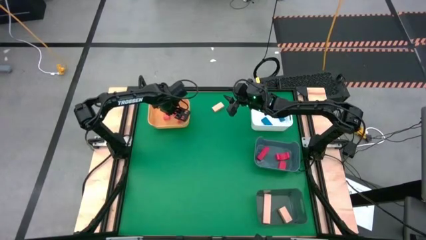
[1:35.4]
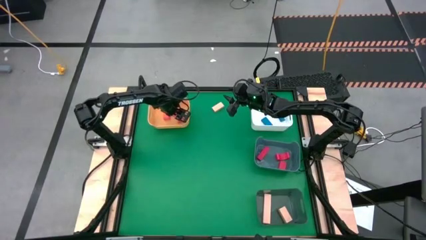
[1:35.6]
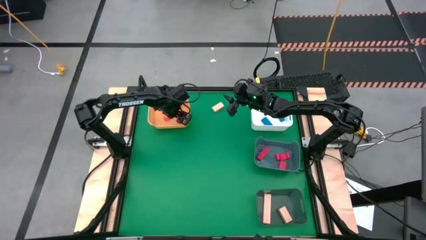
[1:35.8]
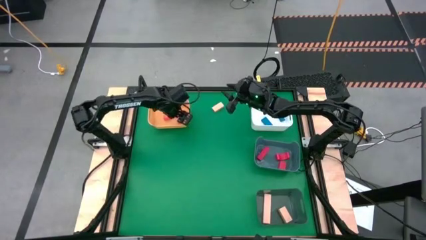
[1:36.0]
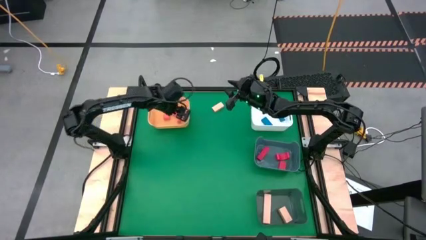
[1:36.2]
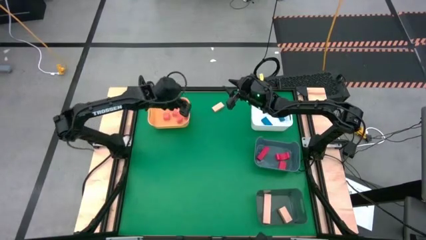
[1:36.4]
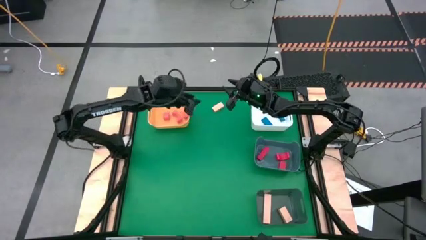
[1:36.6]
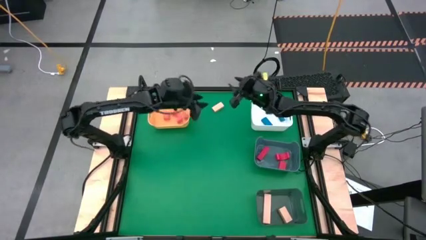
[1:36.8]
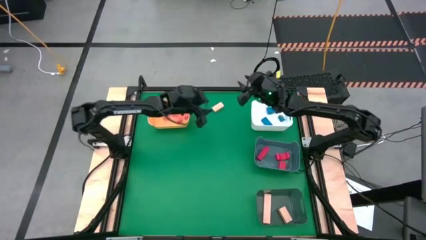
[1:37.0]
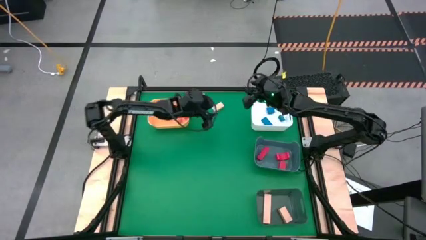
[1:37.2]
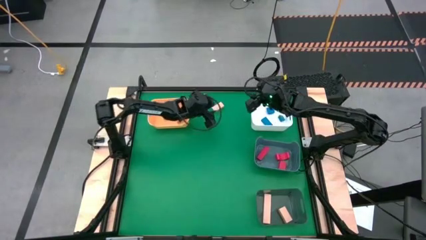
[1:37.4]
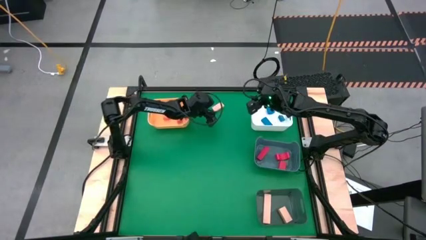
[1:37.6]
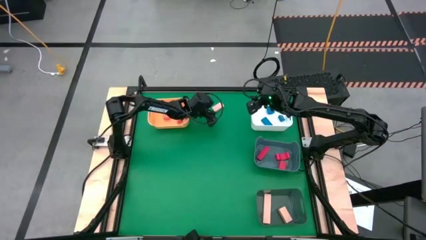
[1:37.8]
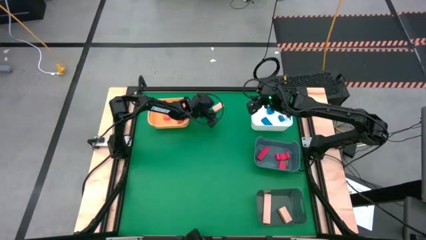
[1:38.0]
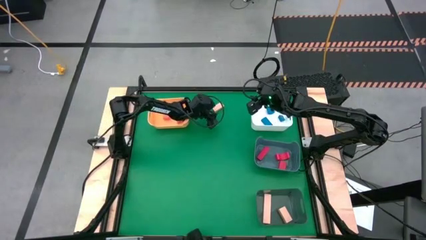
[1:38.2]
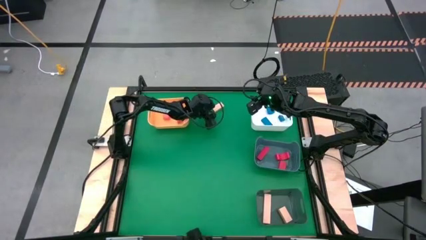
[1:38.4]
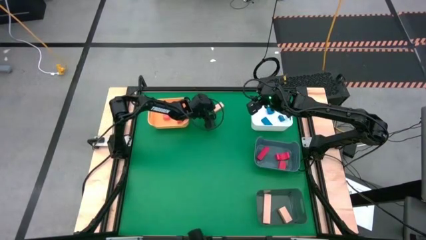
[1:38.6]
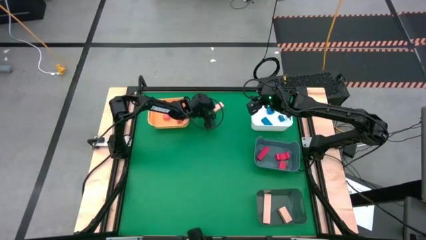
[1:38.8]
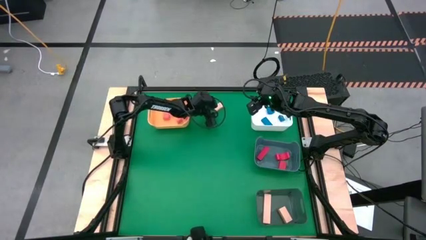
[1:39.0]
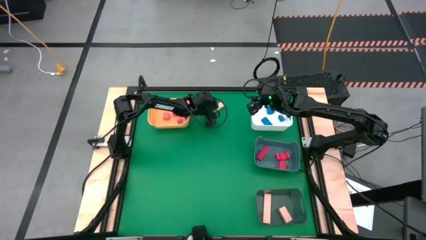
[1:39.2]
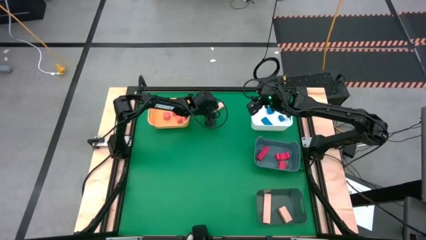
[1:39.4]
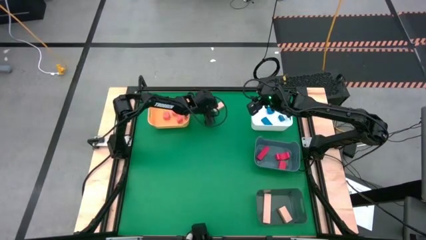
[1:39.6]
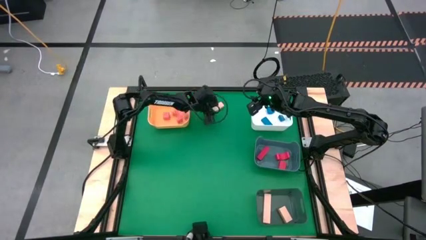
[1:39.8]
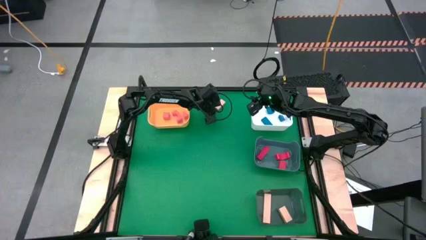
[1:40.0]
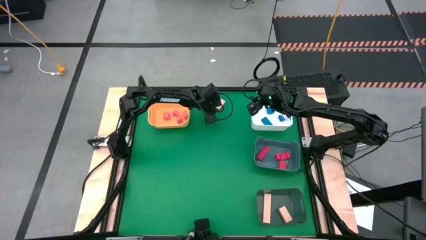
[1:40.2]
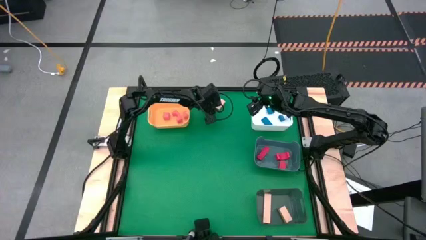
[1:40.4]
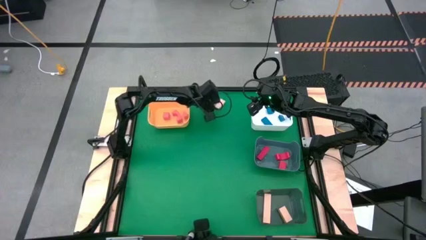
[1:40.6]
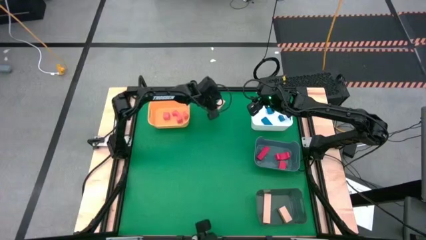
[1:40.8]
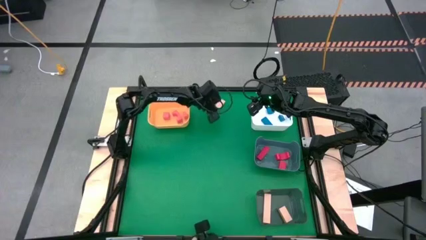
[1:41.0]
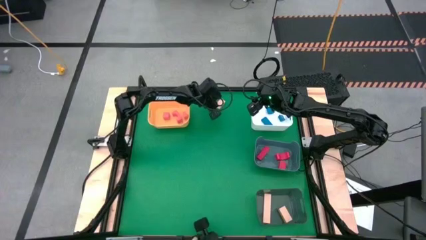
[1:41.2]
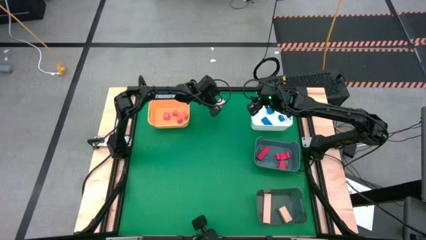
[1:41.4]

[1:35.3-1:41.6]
Task: Sort & place blocks by color
Put the brown block into the black bin

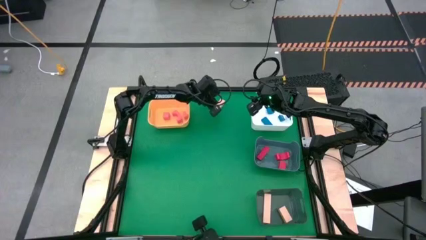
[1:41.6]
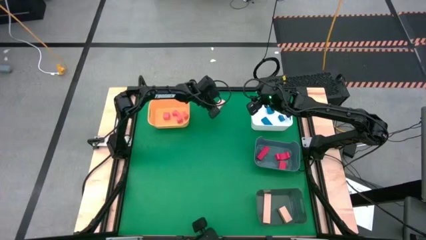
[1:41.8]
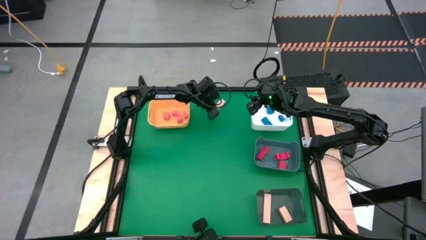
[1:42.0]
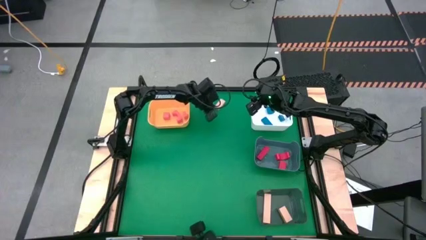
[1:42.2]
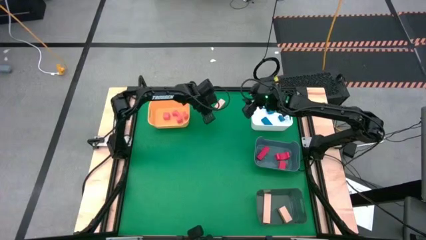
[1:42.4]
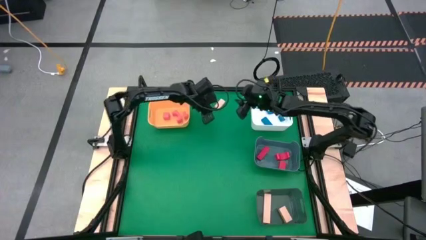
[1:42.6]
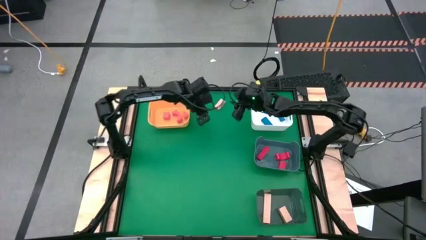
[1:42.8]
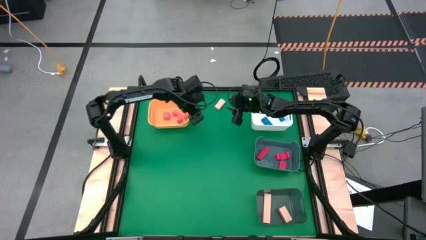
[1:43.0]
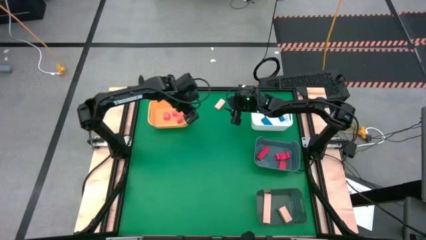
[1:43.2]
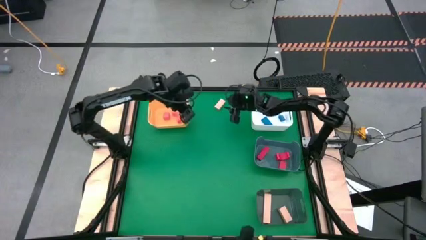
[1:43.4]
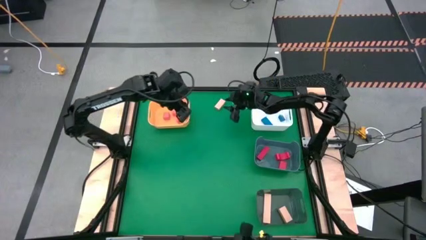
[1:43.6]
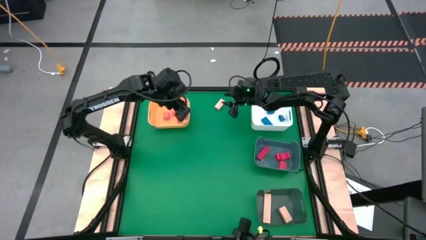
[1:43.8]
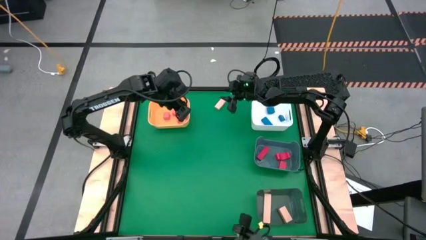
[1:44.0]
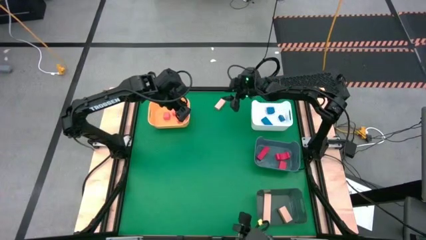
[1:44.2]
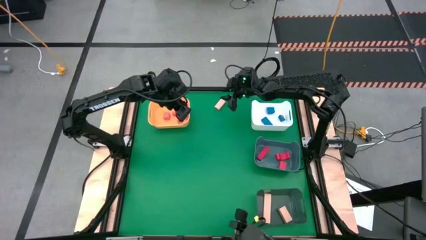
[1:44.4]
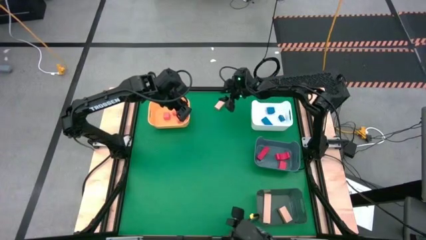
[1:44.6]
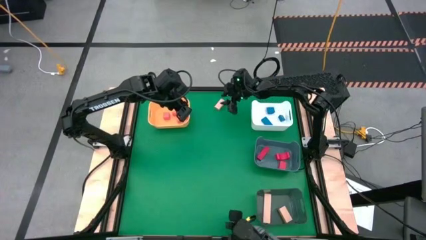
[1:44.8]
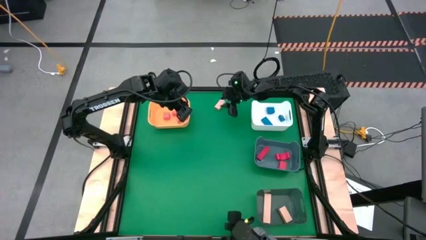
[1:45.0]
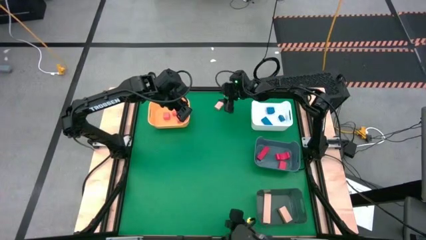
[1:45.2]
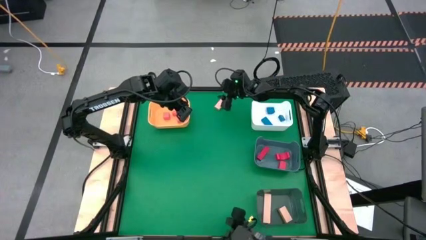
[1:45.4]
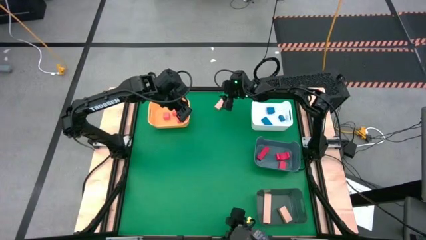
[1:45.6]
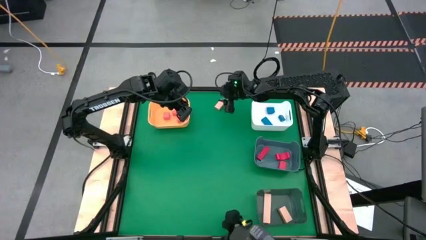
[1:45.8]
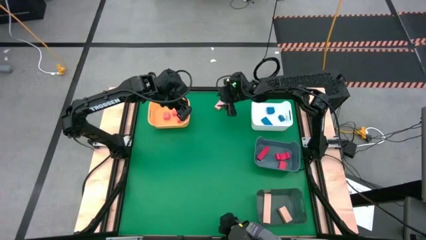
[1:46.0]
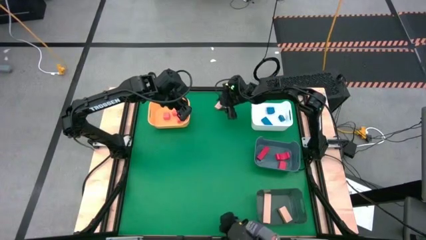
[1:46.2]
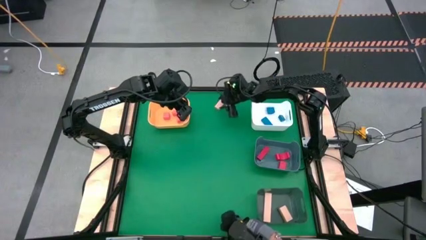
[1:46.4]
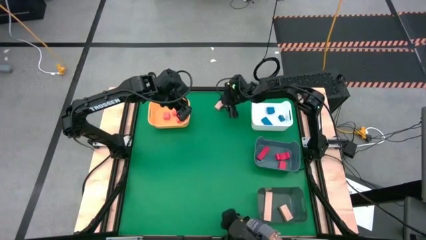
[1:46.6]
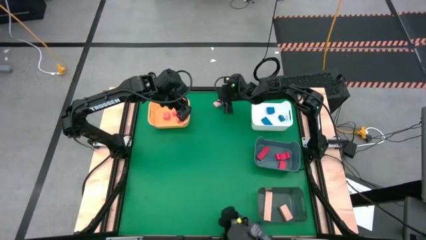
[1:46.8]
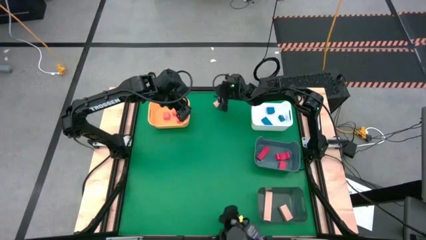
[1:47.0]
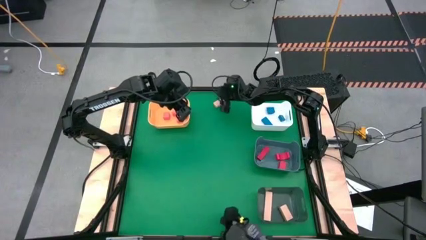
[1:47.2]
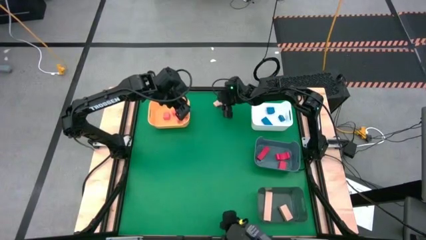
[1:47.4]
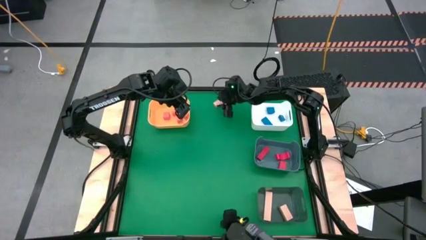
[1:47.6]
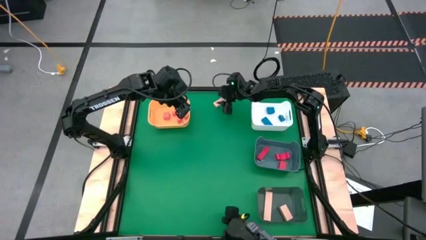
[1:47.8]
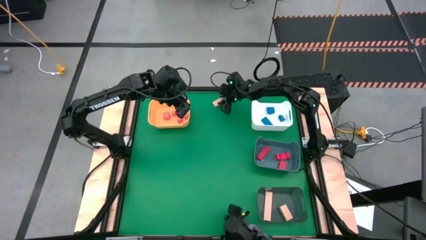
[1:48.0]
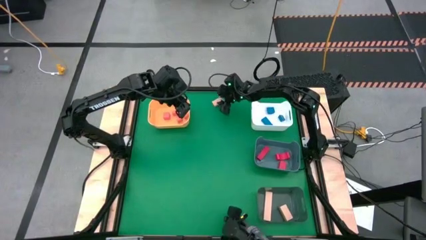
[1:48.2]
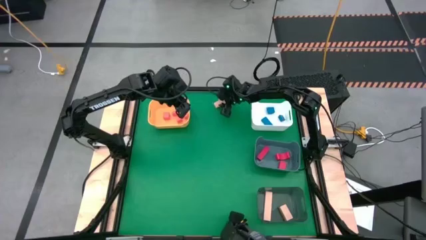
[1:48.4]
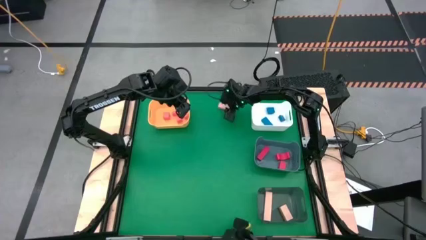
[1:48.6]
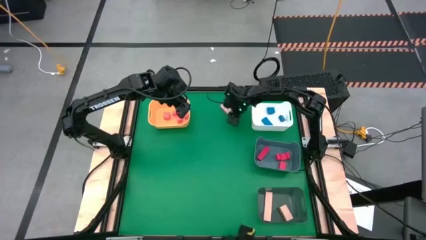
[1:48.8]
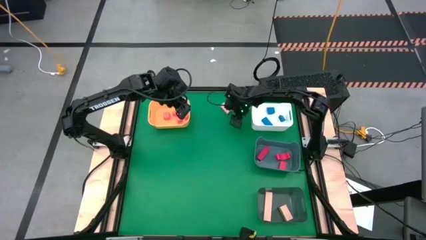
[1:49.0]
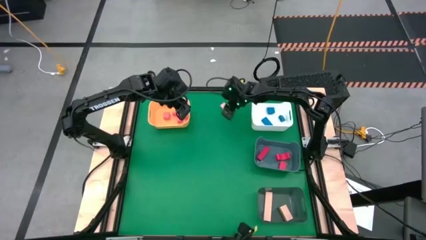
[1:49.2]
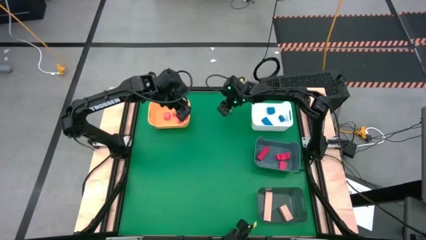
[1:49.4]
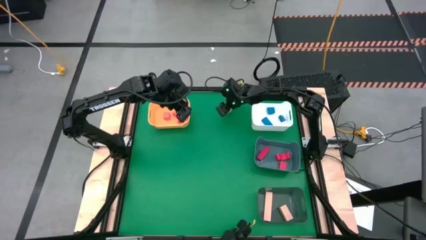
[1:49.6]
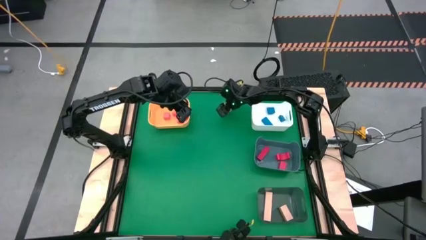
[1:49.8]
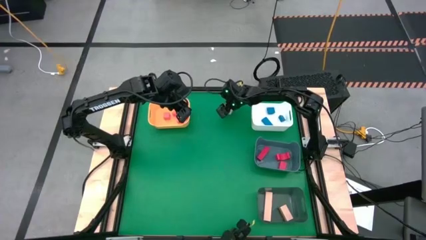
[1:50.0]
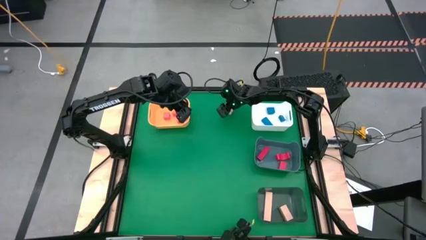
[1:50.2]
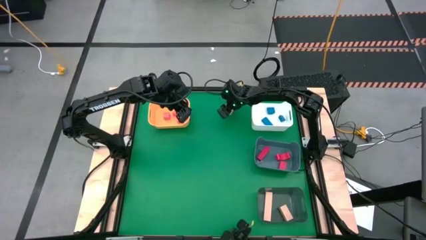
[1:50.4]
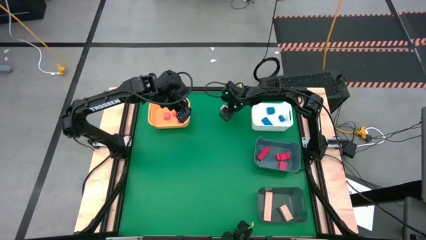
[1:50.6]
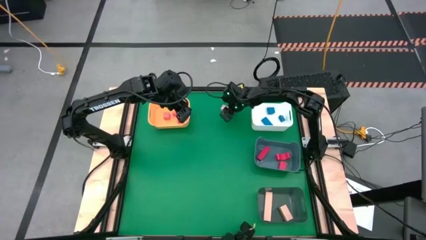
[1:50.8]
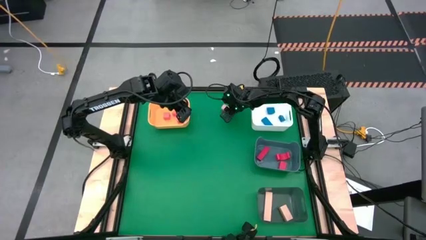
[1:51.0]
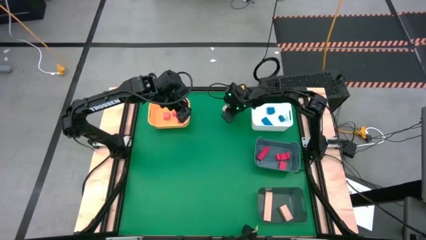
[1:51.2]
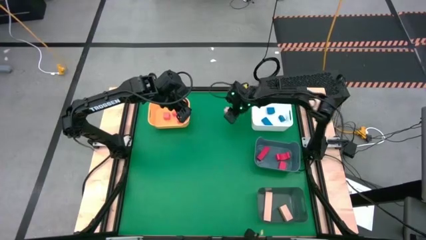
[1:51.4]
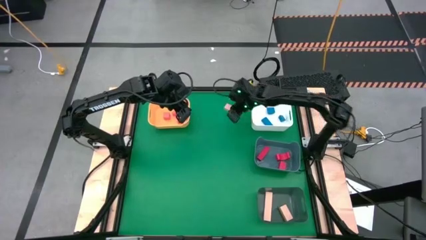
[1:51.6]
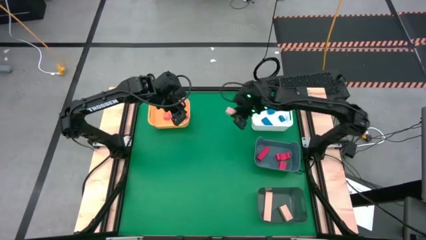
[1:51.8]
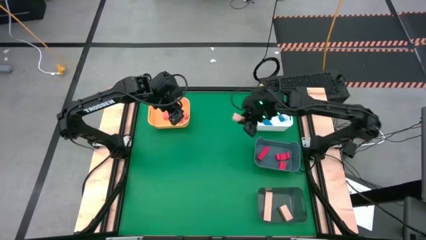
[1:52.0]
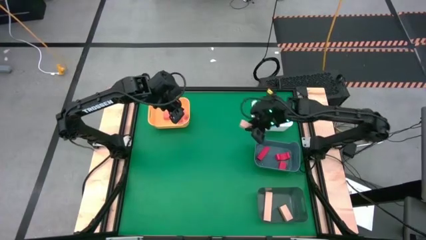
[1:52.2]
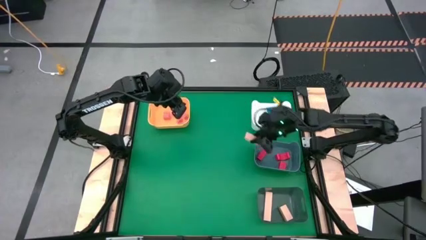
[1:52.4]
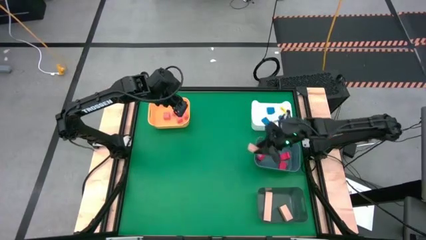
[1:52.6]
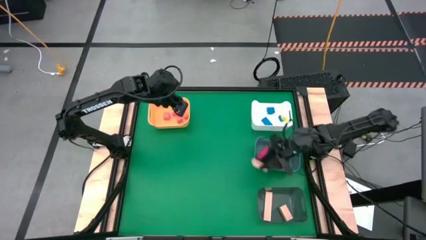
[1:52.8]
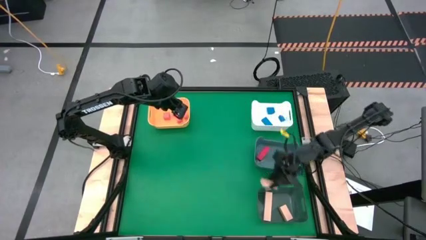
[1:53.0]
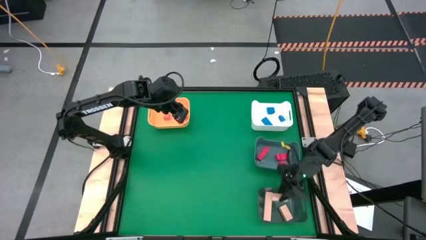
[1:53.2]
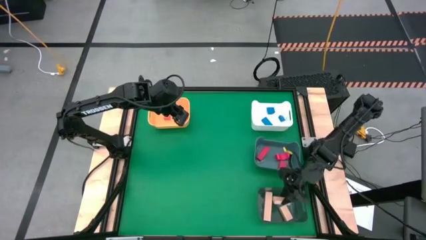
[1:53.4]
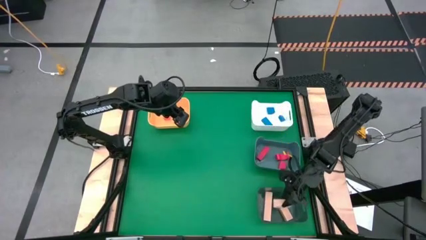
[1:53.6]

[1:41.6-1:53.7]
Put the brown block into the black bin
